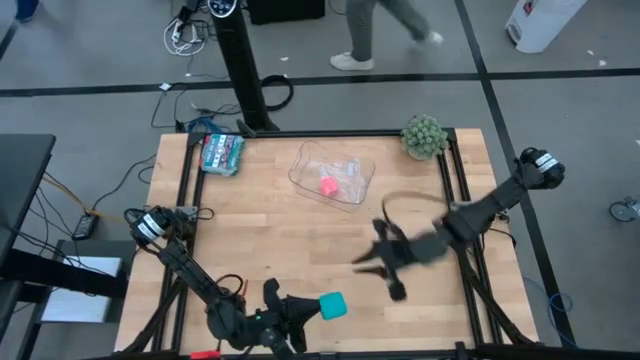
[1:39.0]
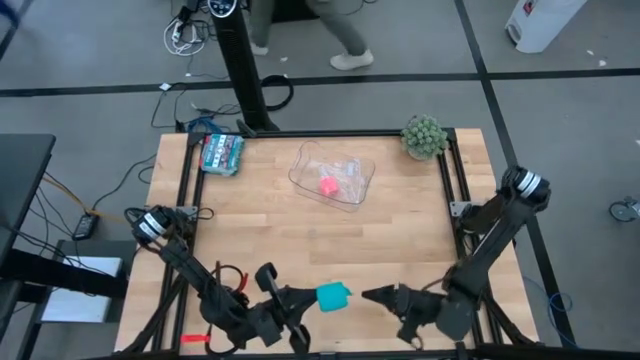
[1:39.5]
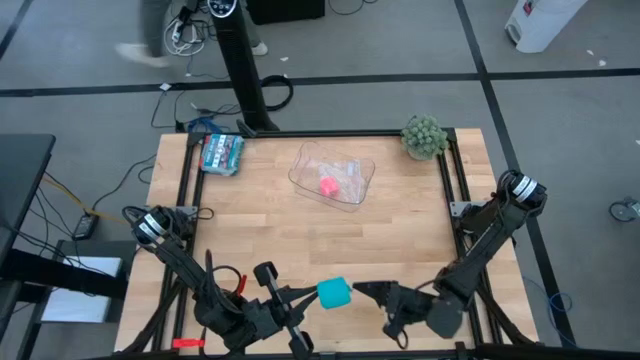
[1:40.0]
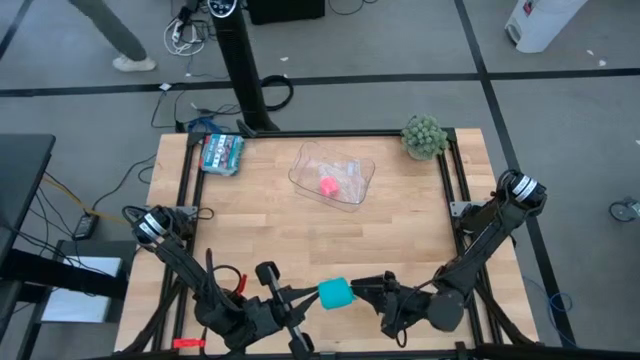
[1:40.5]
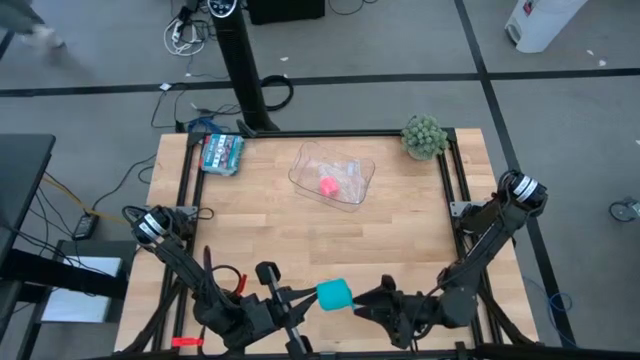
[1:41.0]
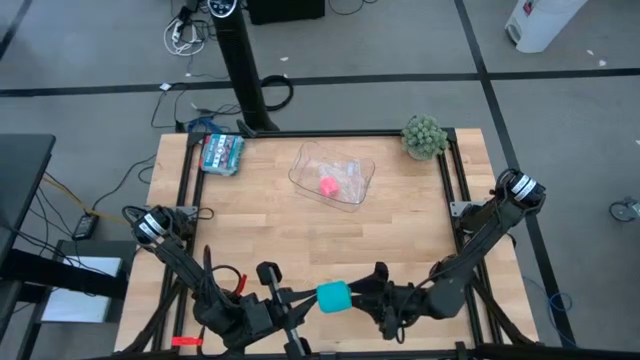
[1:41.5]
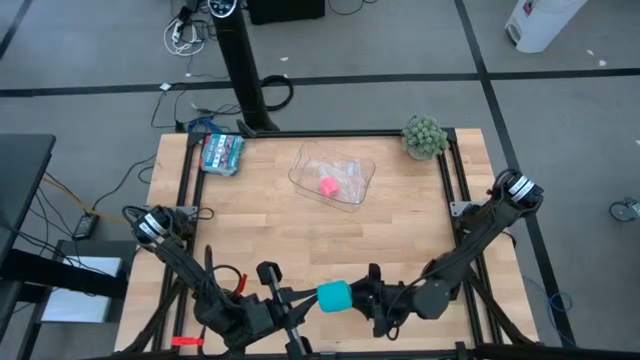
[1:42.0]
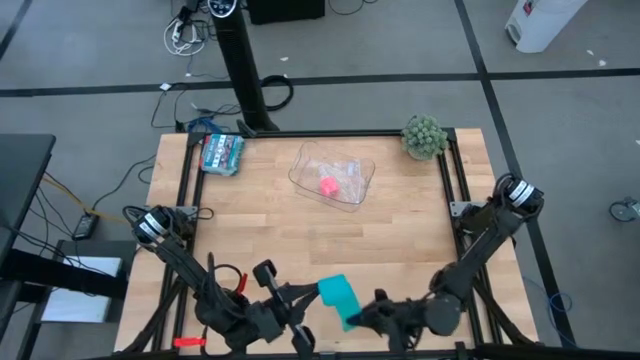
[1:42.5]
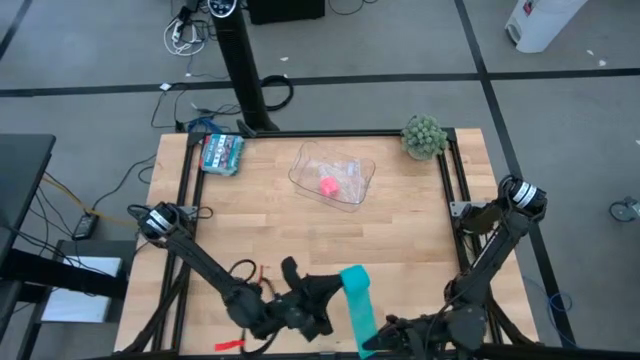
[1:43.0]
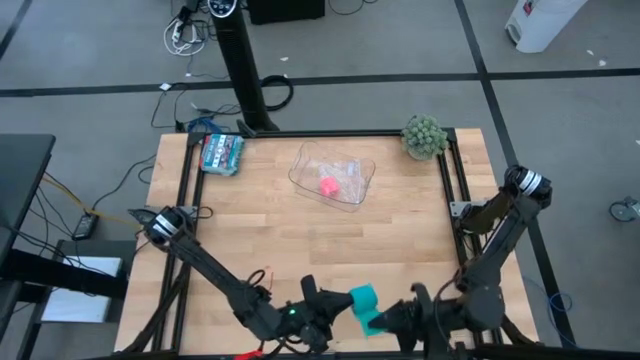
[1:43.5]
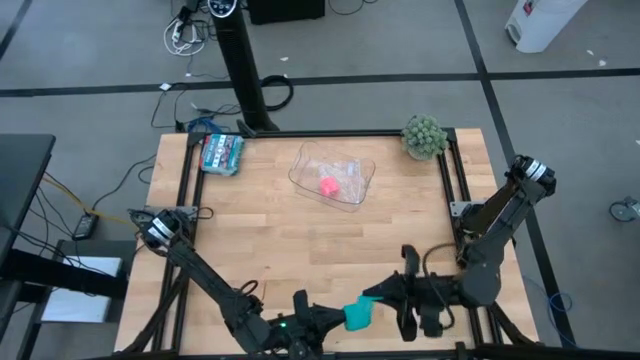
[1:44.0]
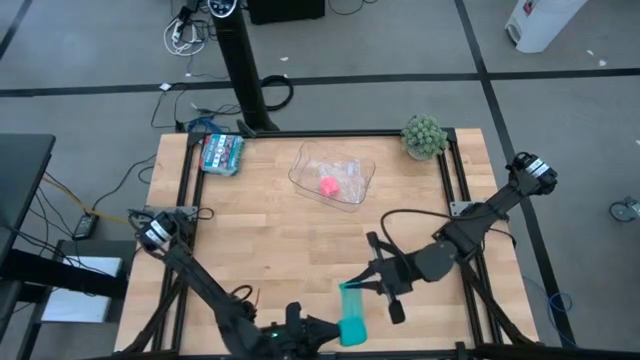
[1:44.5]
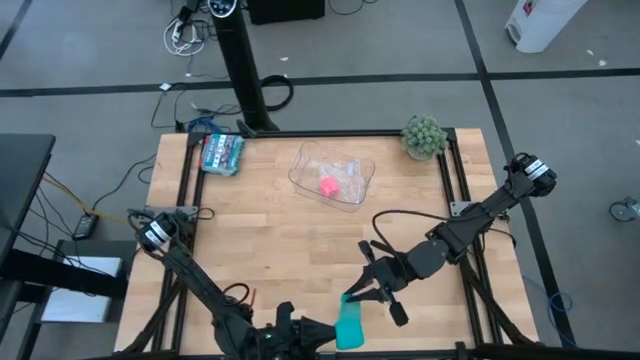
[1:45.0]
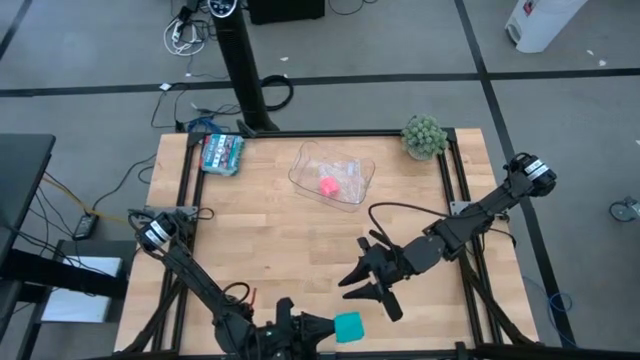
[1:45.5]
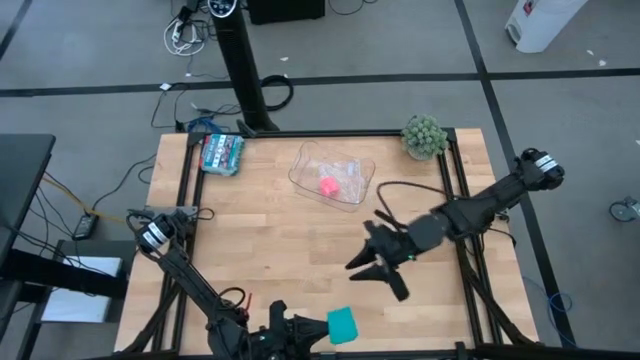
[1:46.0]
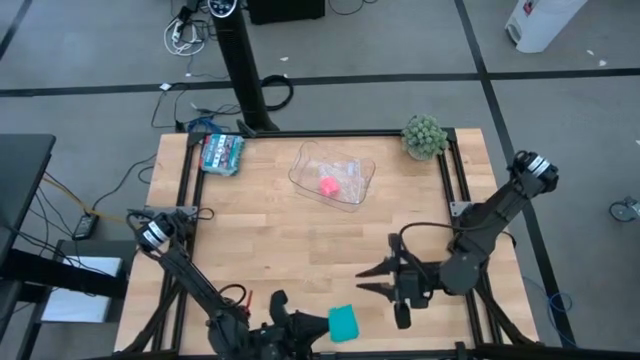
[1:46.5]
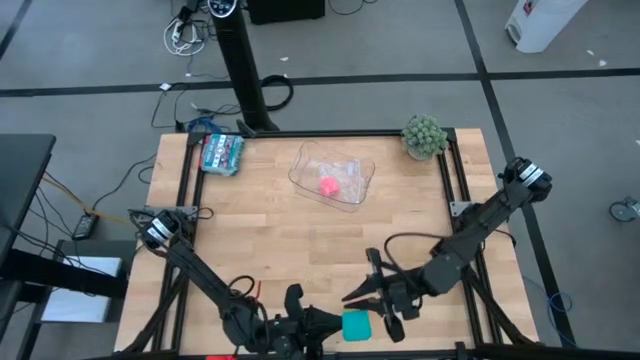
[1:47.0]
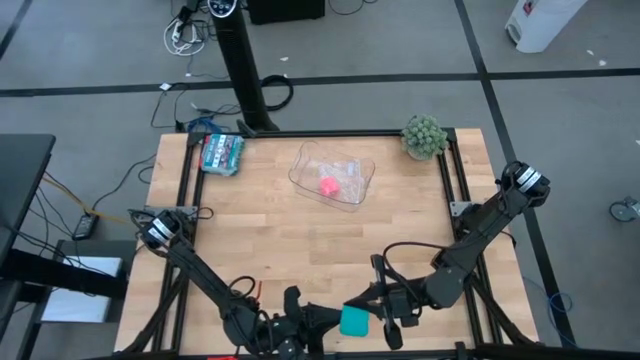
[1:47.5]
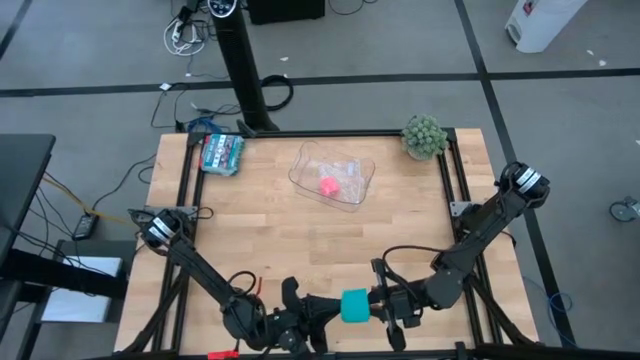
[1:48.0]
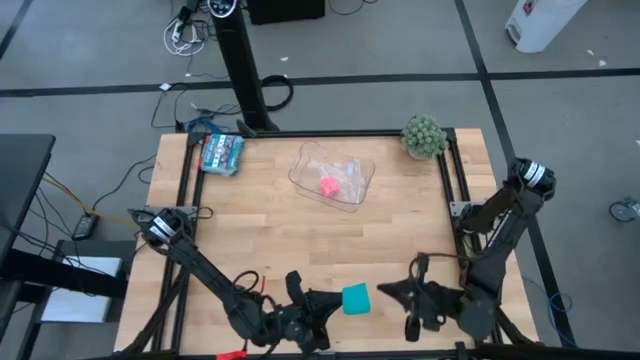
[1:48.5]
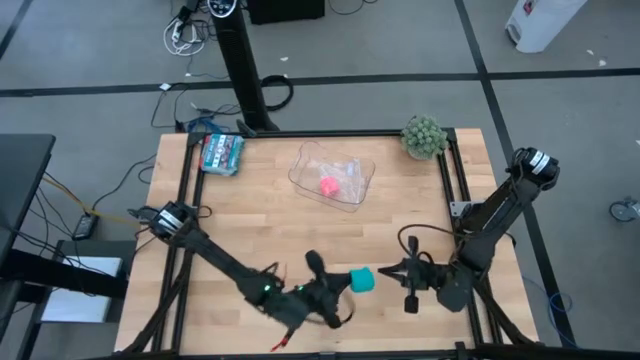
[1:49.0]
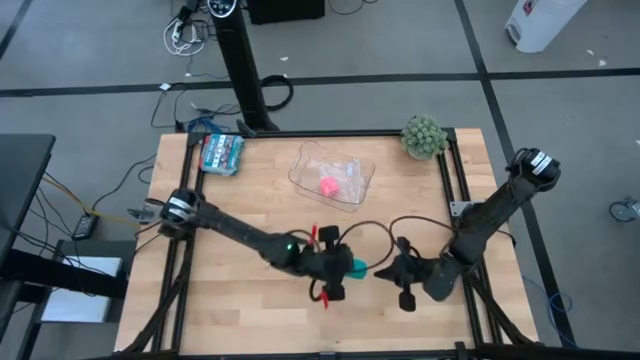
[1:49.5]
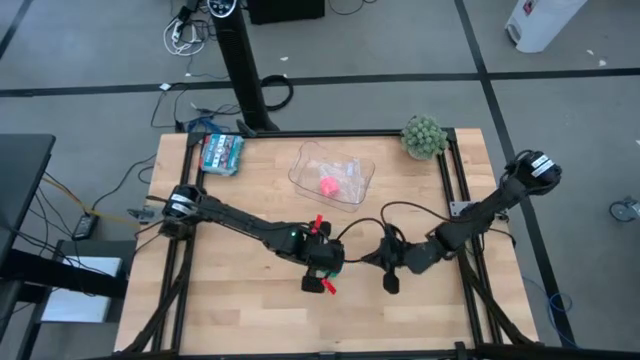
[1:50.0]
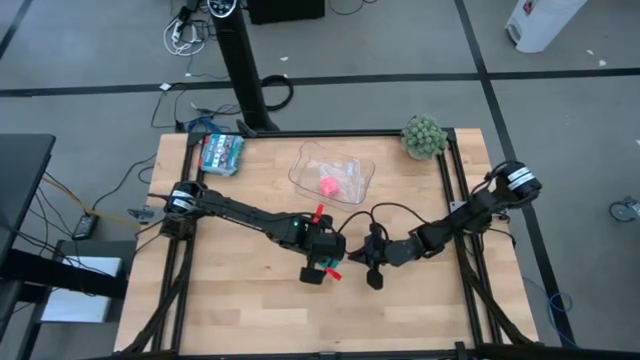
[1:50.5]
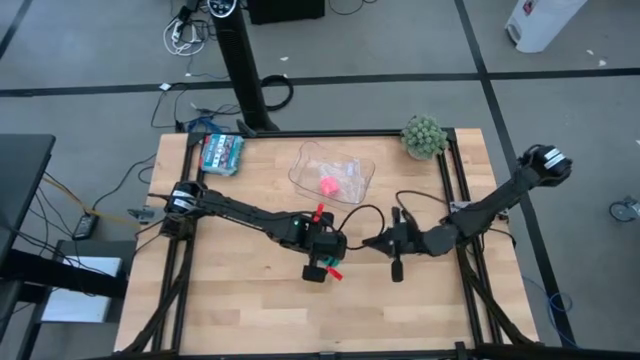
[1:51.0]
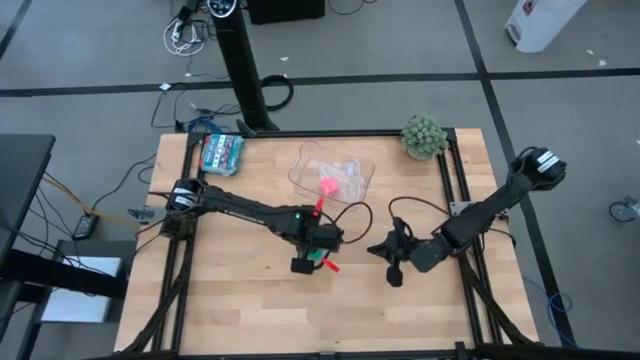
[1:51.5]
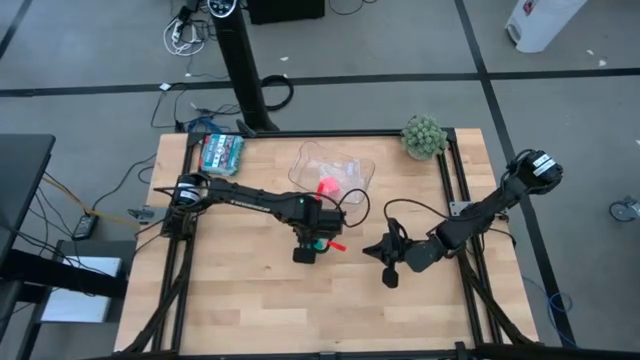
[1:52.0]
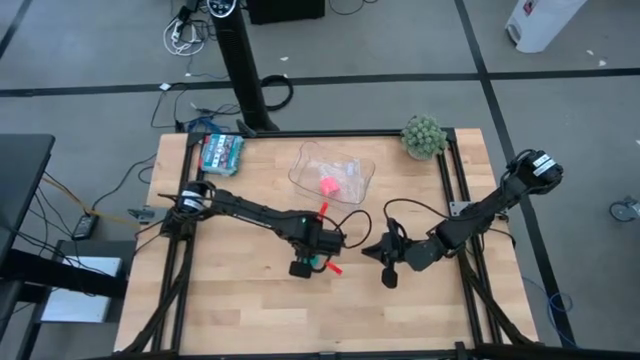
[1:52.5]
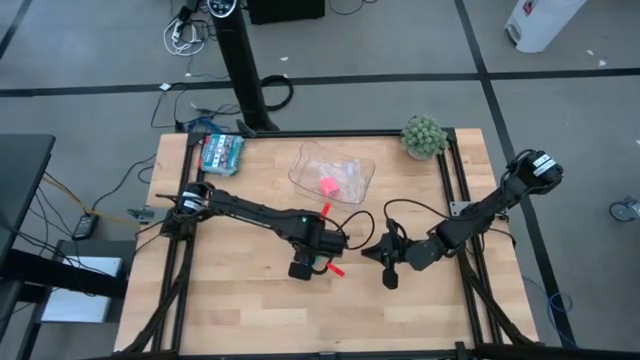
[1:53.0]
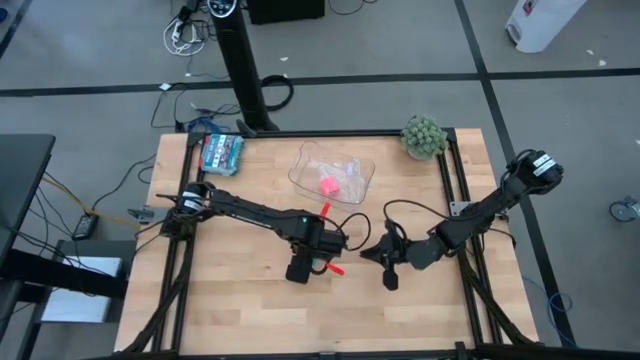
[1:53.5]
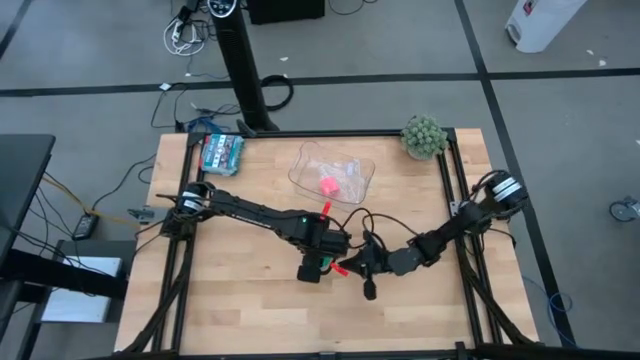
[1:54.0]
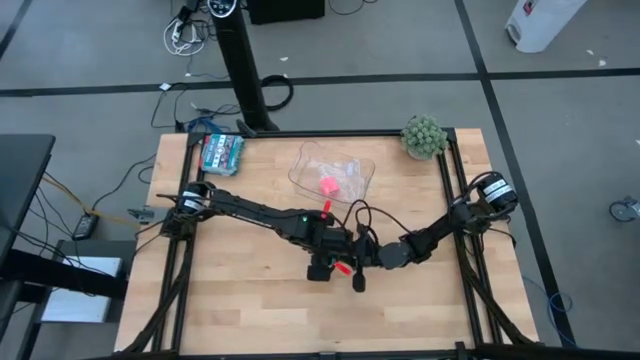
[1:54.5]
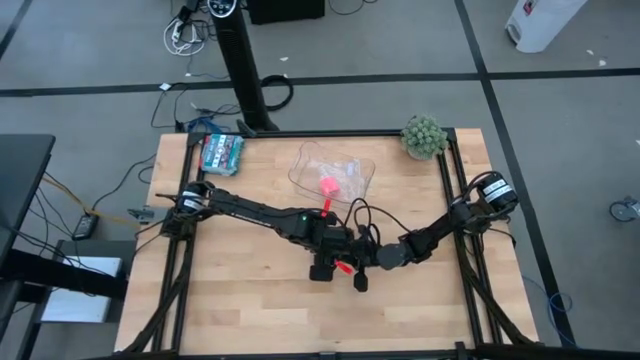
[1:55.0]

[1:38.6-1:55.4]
Task: Roll bandage
Roll the blue bandage

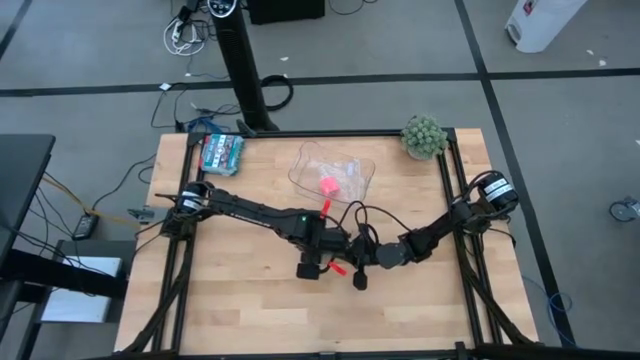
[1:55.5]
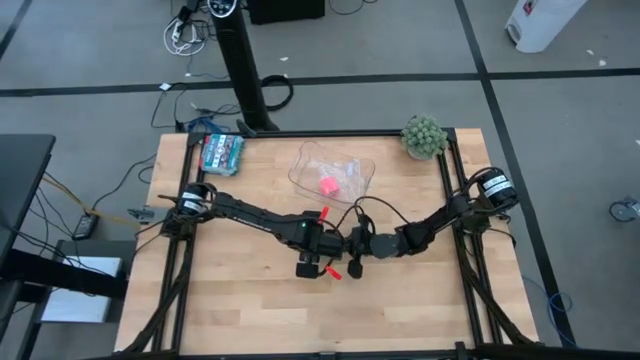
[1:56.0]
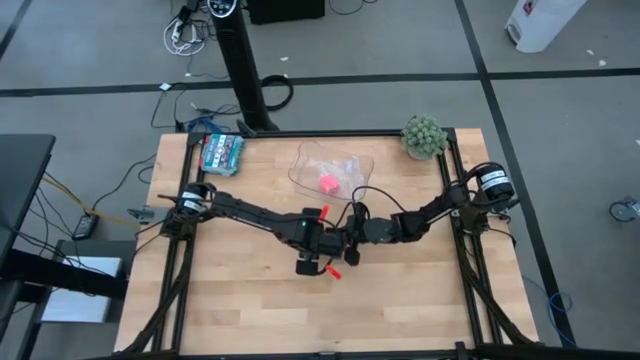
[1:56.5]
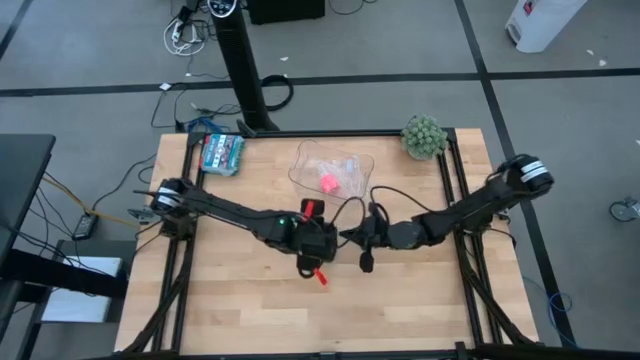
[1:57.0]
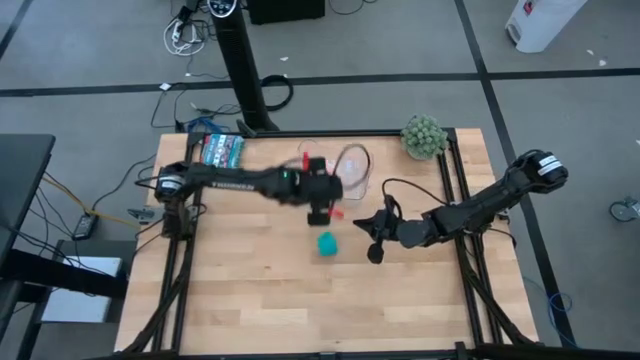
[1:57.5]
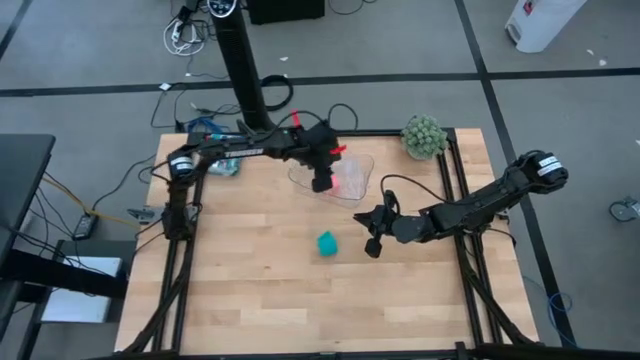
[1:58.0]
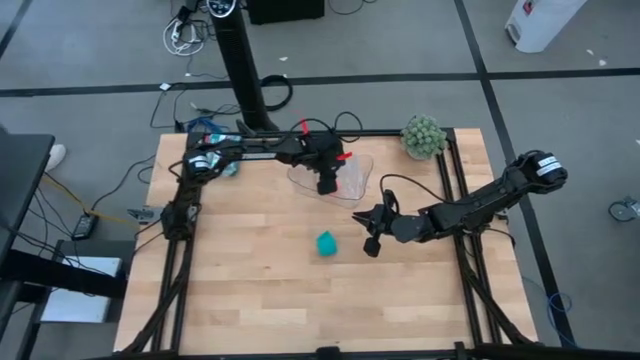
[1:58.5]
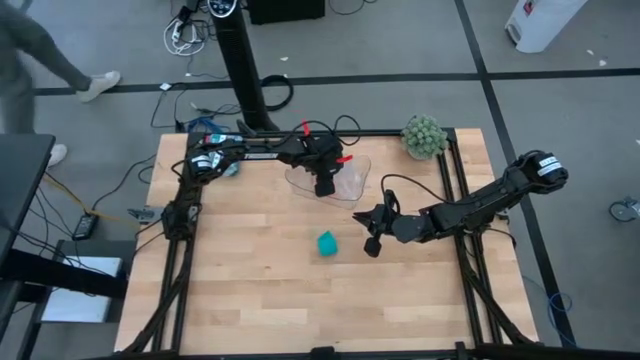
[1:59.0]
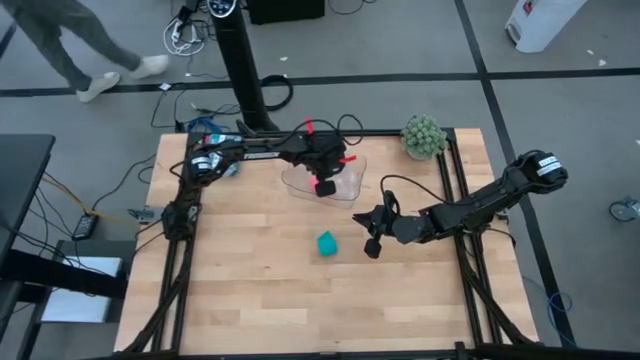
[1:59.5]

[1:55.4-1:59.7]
Open the transparent zip bag

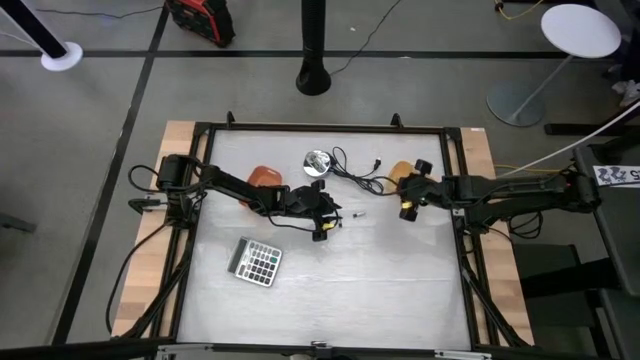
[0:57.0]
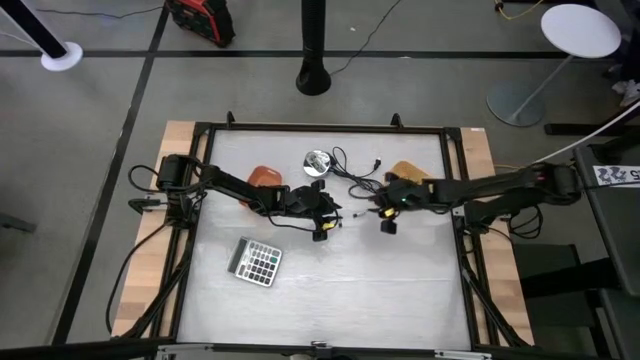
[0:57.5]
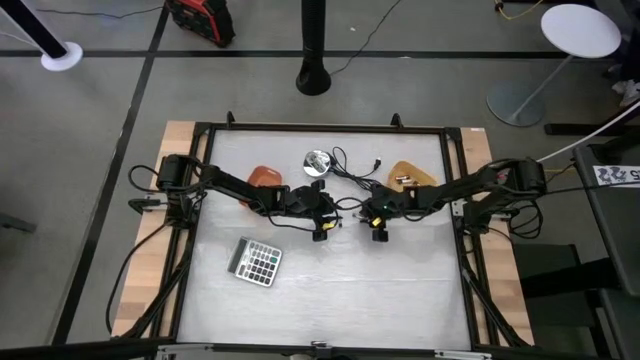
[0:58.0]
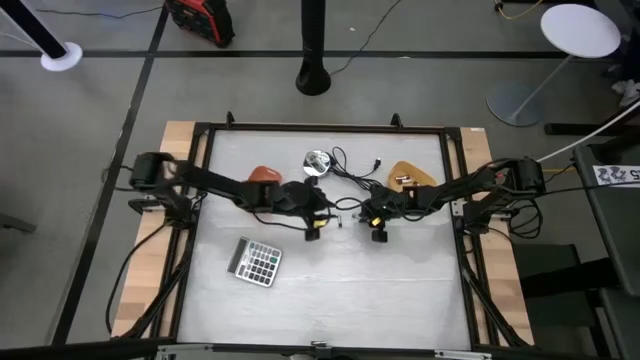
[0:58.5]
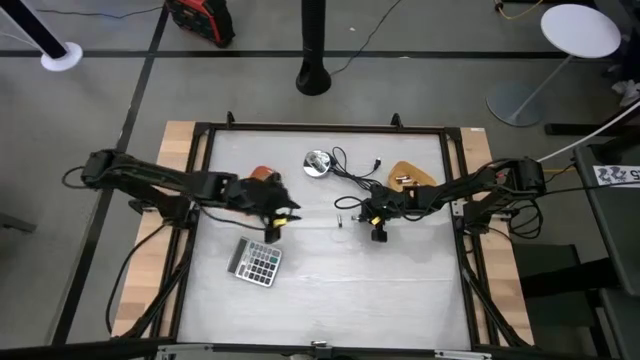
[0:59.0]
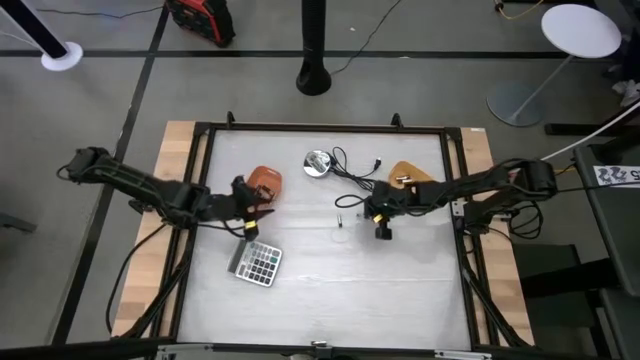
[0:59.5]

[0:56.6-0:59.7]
Task: Sort batteries
Put the silver battery into the yellow bin
